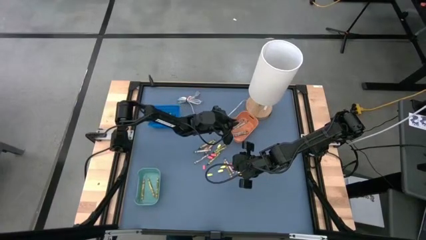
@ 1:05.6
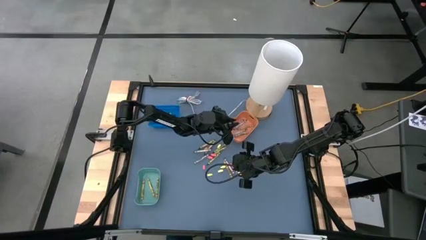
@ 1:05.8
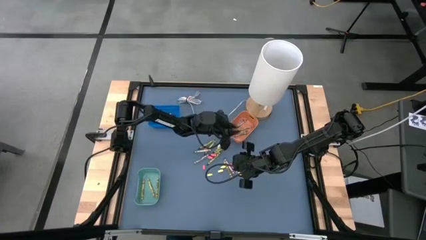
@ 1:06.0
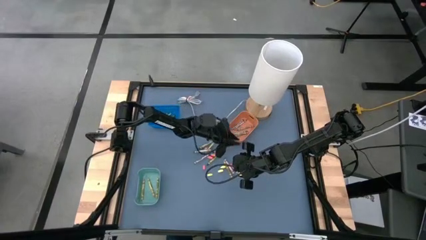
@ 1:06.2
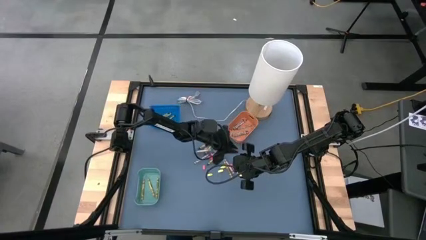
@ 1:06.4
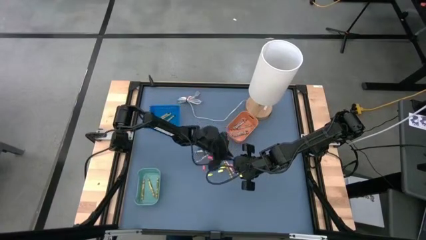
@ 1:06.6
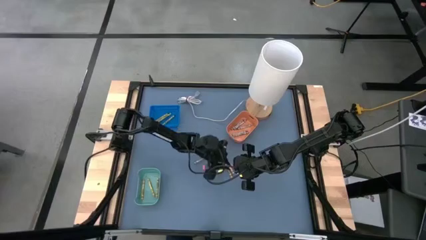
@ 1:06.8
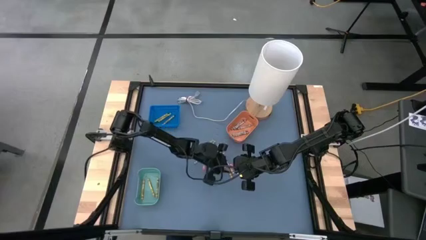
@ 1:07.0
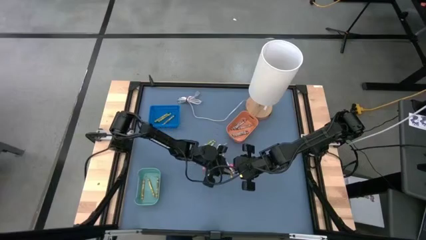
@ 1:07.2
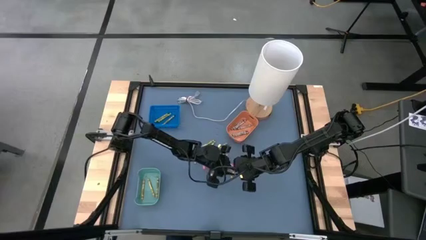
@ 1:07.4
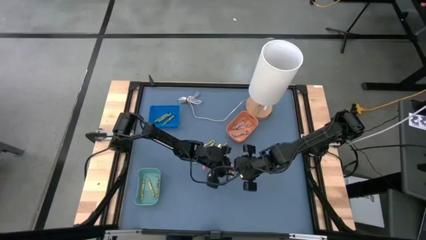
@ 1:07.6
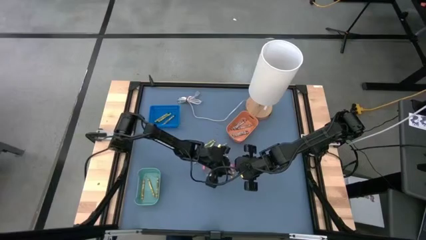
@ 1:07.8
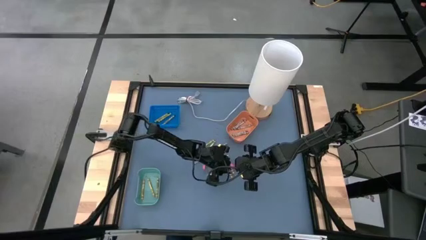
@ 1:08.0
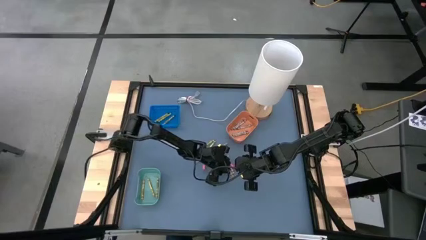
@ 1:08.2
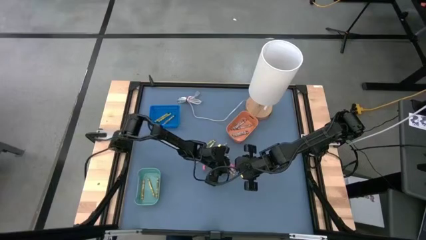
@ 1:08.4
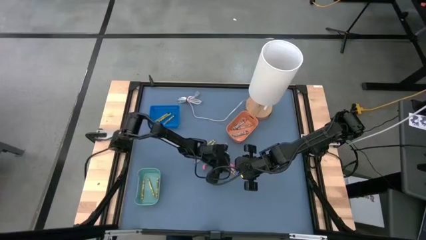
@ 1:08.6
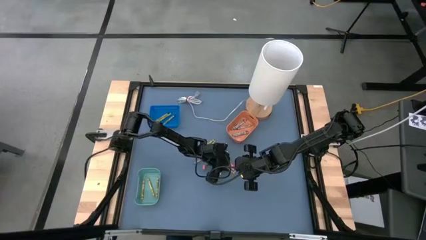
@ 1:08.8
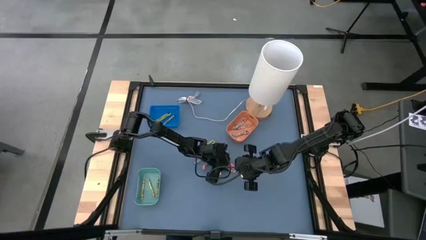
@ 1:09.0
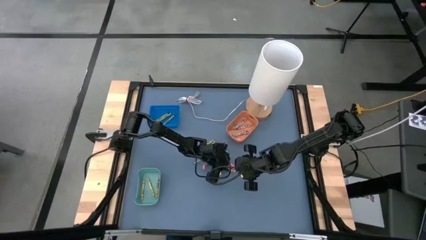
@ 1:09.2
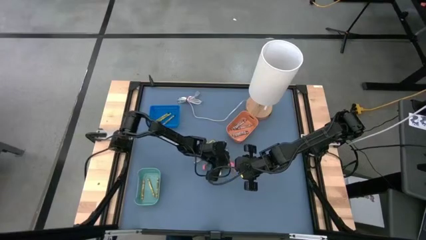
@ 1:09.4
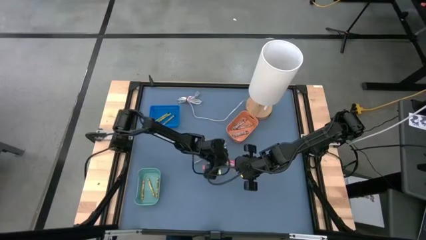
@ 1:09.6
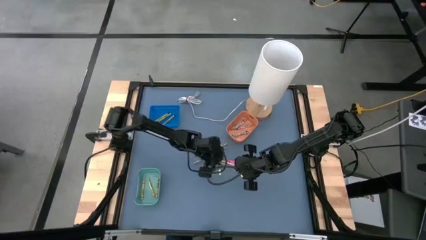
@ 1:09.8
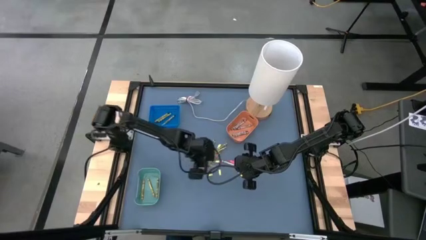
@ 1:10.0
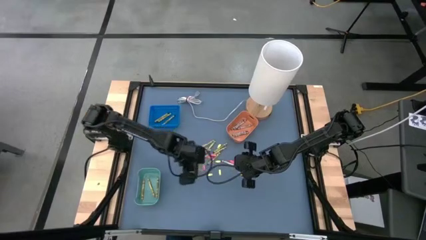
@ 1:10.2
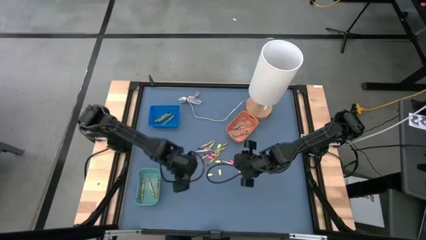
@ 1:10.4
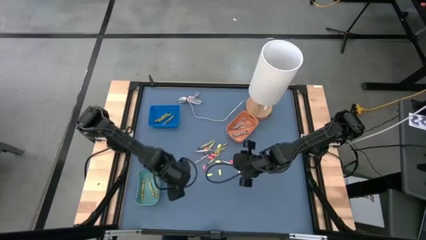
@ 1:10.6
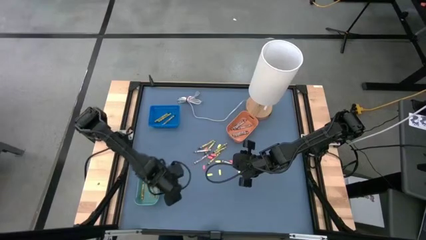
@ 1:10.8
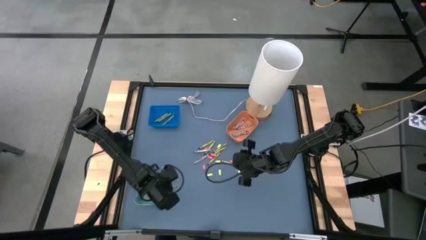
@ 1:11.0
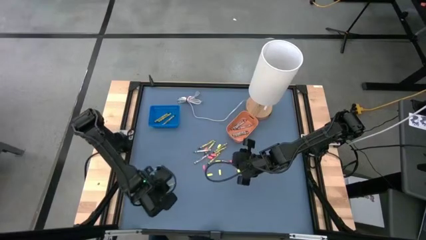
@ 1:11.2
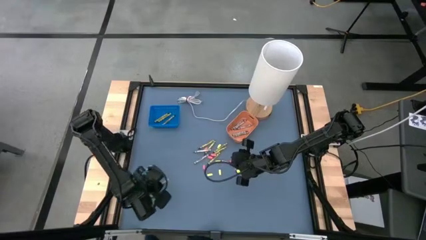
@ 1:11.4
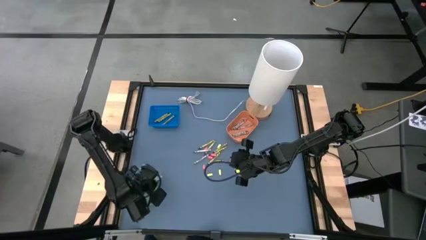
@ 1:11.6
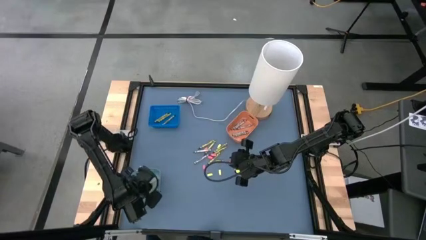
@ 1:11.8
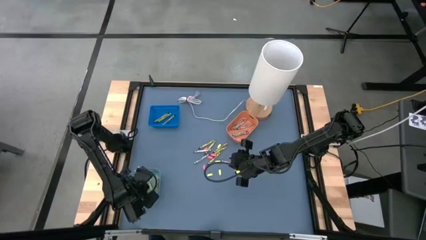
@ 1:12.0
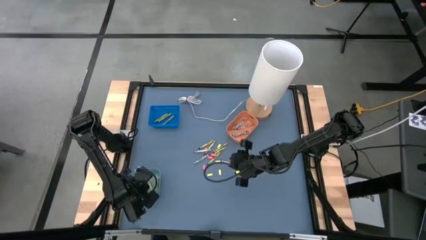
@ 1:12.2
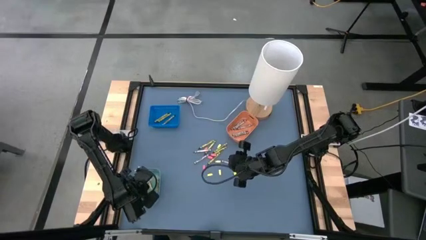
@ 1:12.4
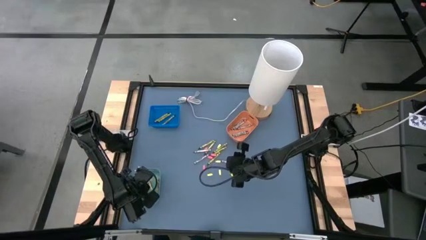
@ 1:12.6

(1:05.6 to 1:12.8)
Task: Sort crayons
Put the yellow crayon into the green bin

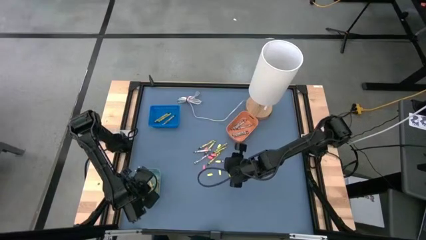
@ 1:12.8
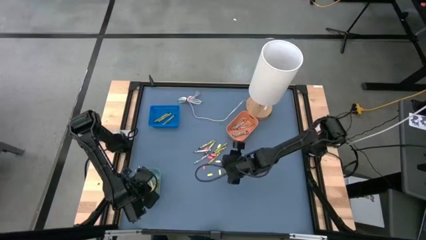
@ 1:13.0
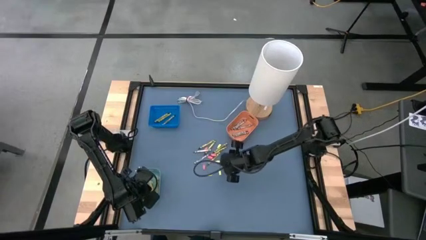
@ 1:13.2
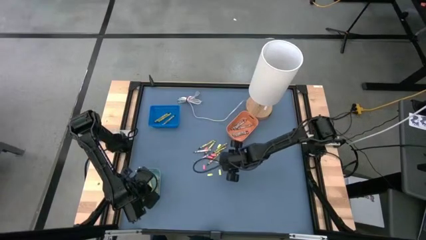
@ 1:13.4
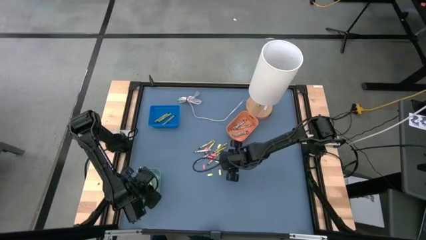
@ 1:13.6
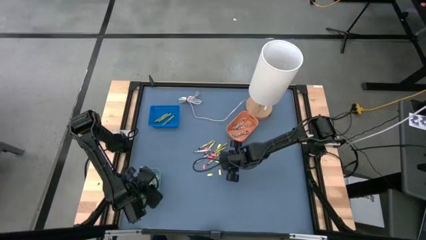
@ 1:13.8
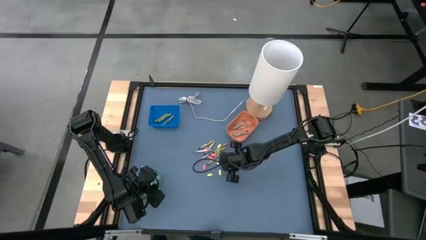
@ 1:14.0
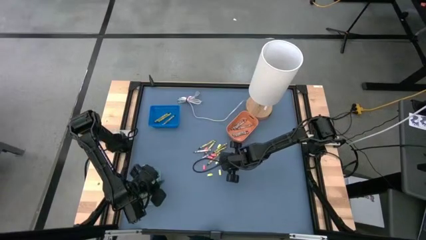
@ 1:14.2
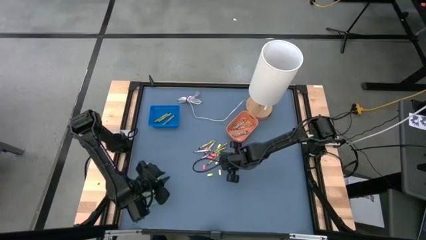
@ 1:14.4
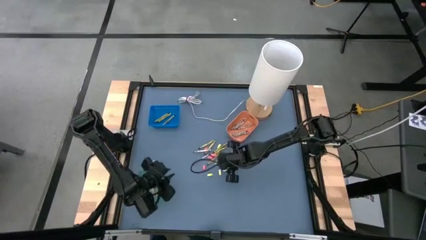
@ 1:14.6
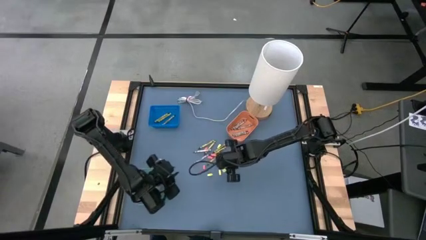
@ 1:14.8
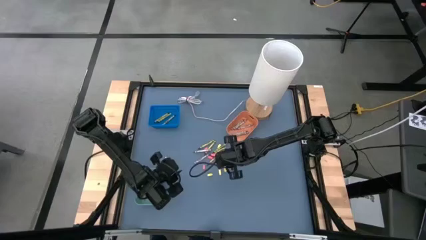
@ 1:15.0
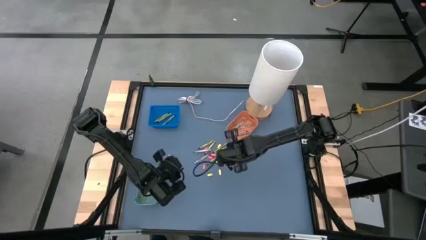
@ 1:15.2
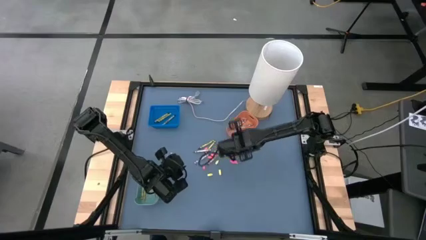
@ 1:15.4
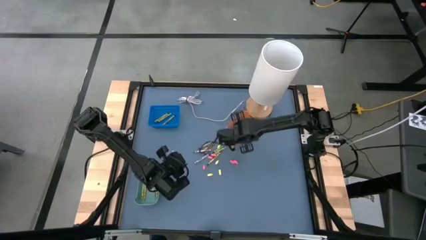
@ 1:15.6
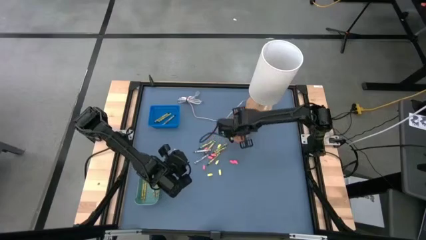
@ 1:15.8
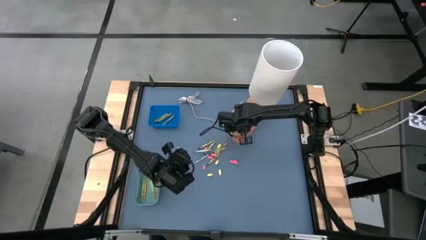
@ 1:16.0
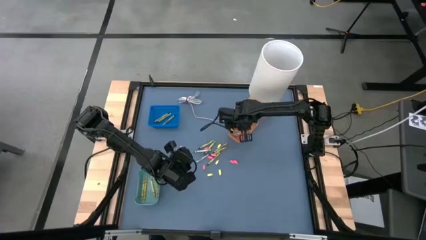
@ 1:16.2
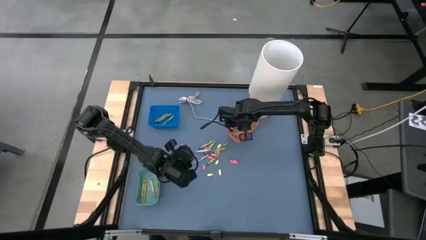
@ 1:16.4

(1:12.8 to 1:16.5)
Put the gray crayon into the orange bin

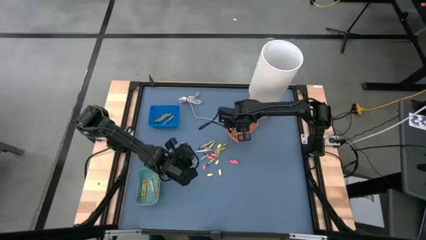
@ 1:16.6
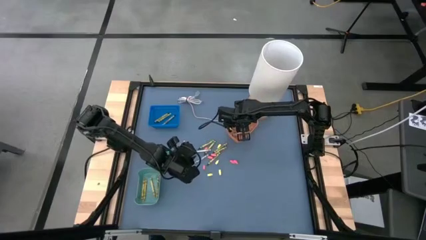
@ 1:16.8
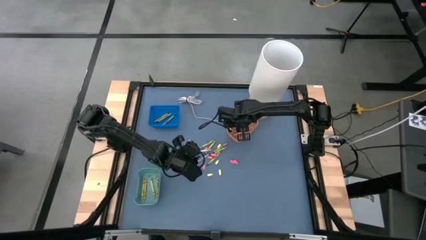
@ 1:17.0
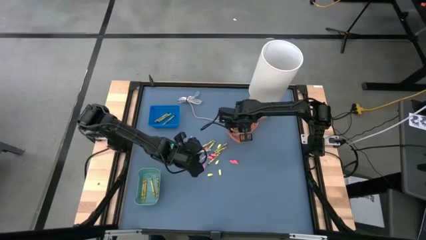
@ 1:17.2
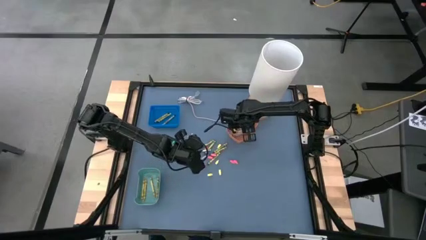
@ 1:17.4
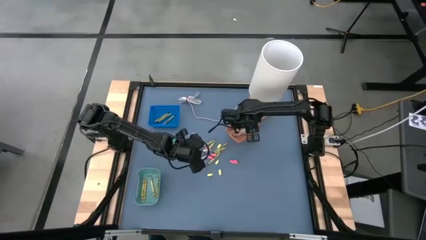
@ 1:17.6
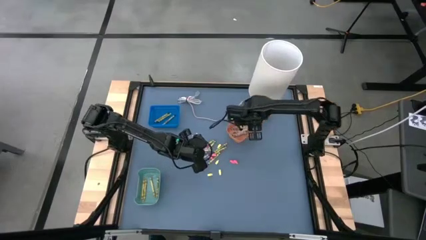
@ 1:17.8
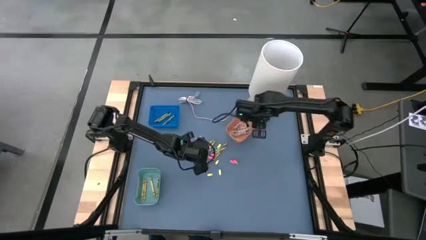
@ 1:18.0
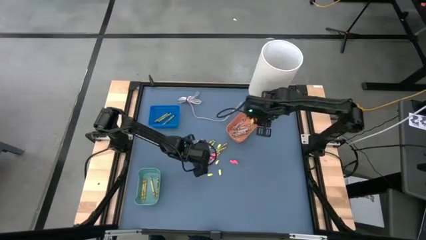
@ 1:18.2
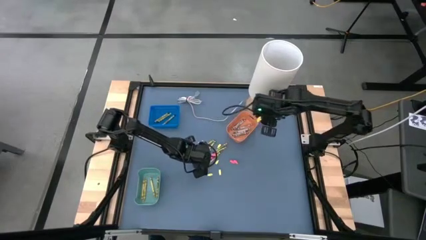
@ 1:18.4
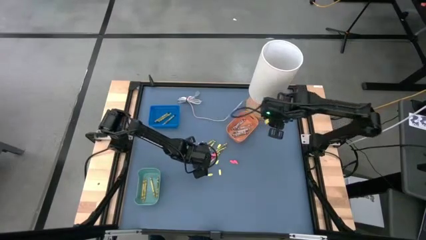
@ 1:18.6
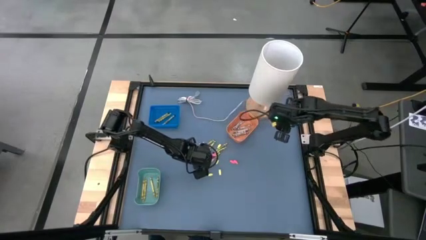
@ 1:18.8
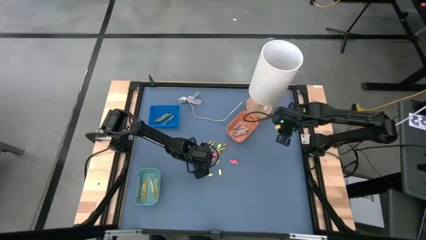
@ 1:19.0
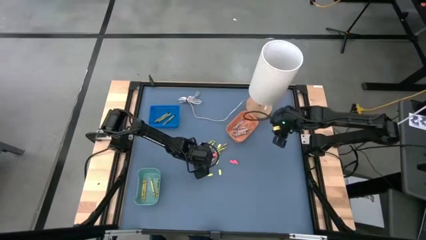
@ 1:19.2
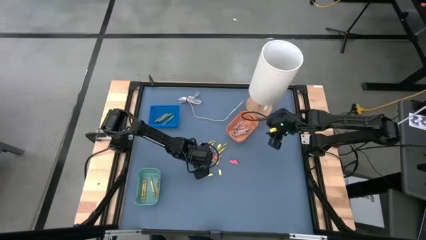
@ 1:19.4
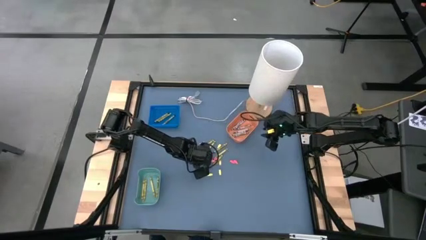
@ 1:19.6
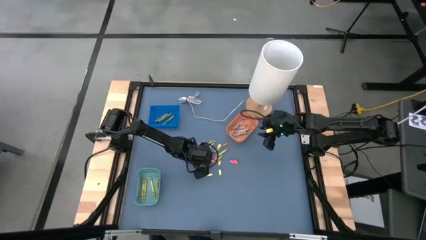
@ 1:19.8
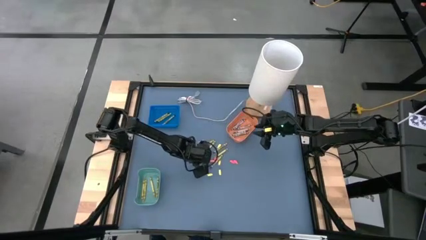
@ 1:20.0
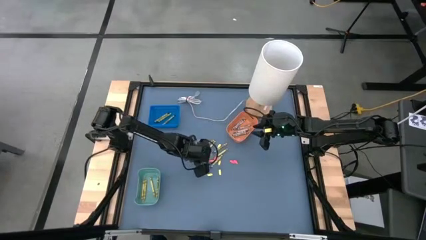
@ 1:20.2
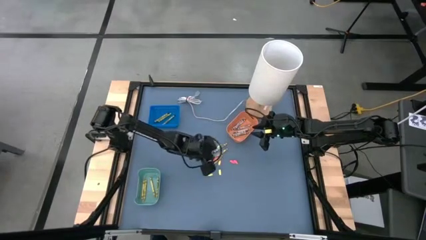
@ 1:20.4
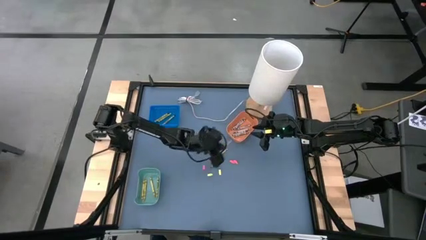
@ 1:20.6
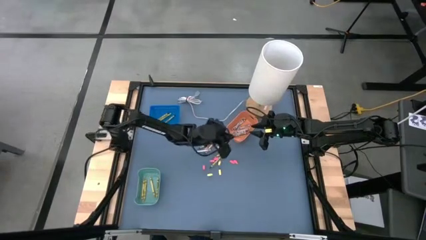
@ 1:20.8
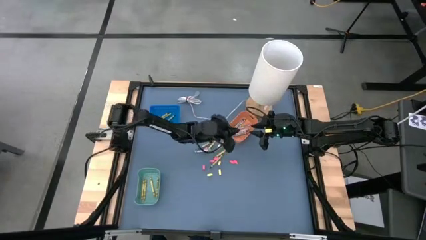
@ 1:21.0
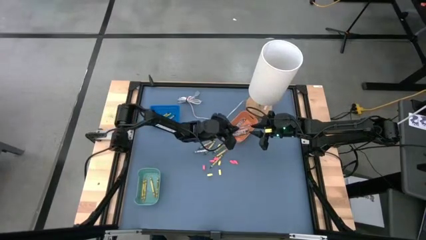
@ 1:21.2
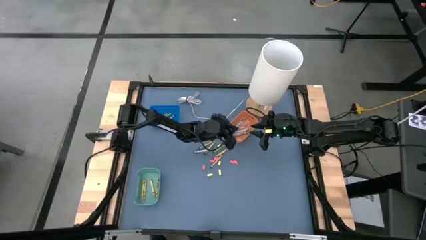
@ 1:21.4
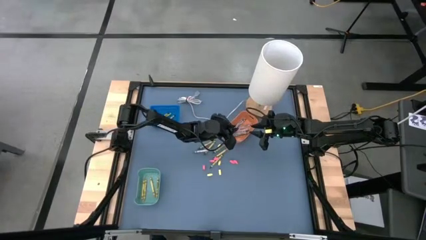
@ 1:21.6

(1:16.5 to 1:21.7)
Put the gray crayon into the orange bin
